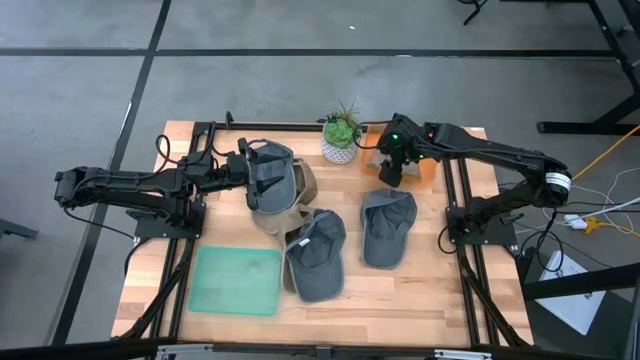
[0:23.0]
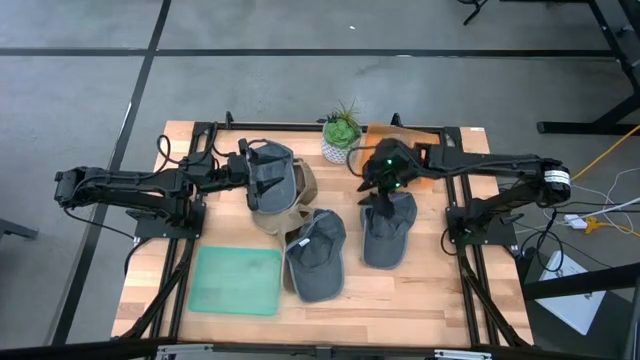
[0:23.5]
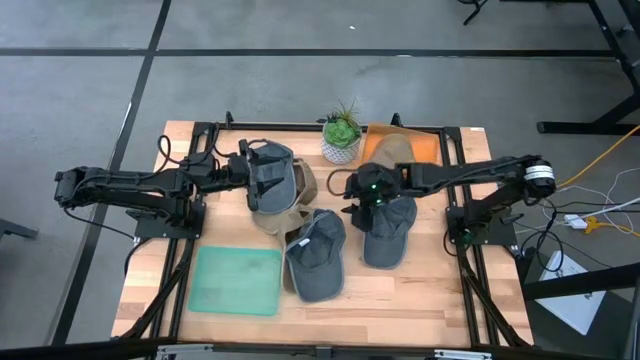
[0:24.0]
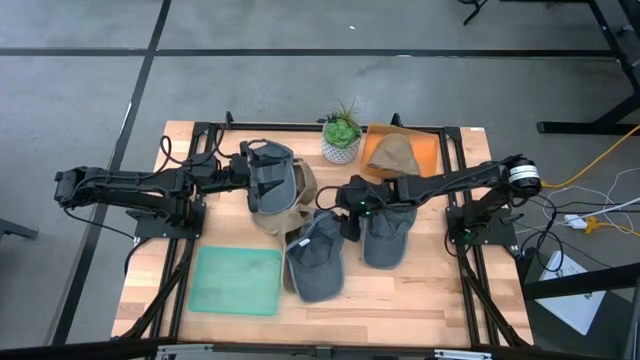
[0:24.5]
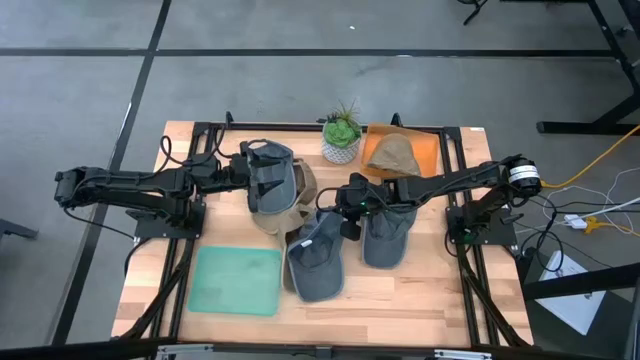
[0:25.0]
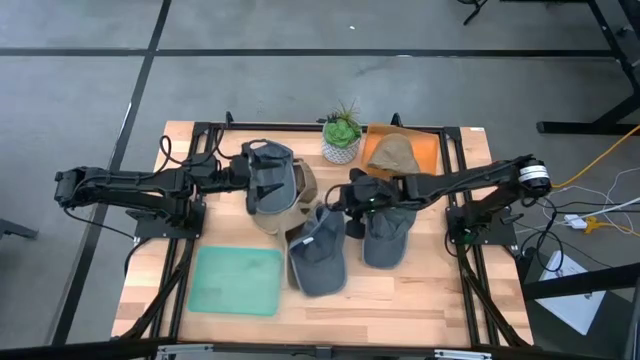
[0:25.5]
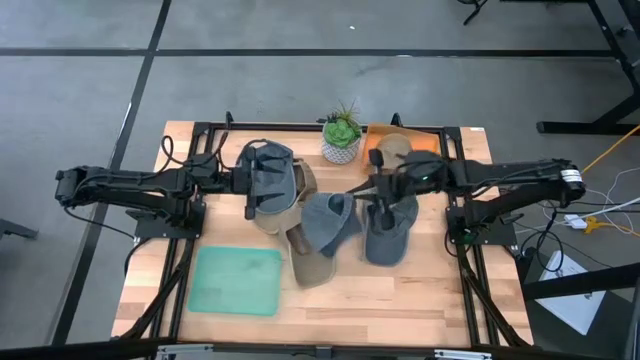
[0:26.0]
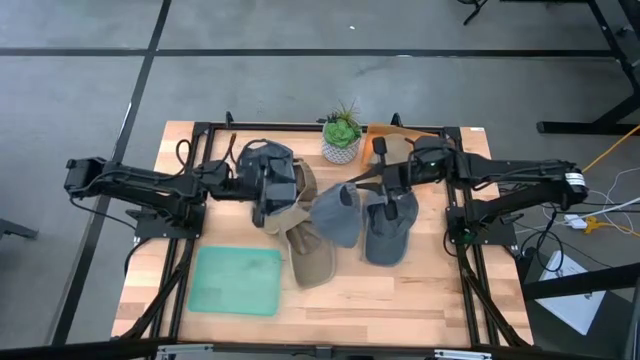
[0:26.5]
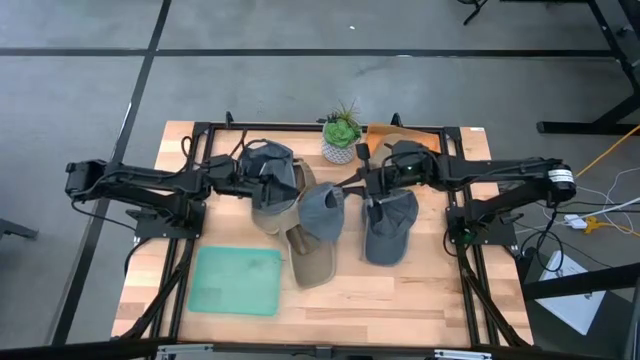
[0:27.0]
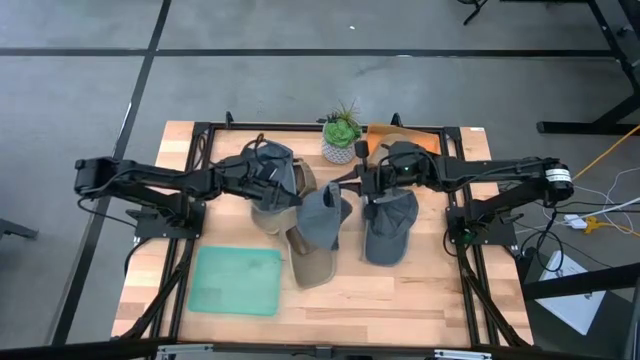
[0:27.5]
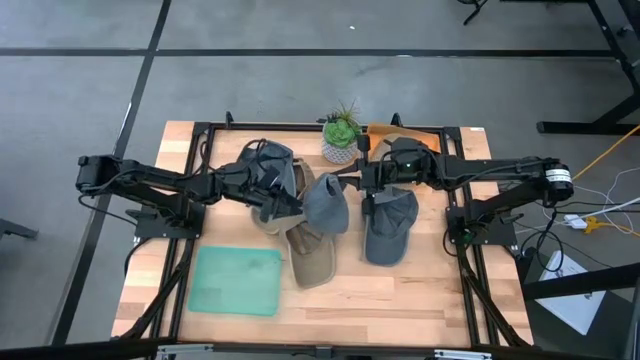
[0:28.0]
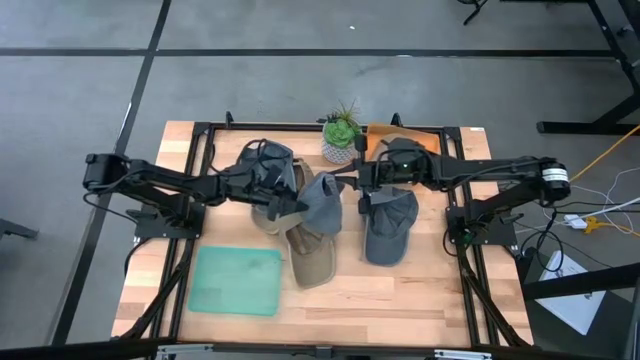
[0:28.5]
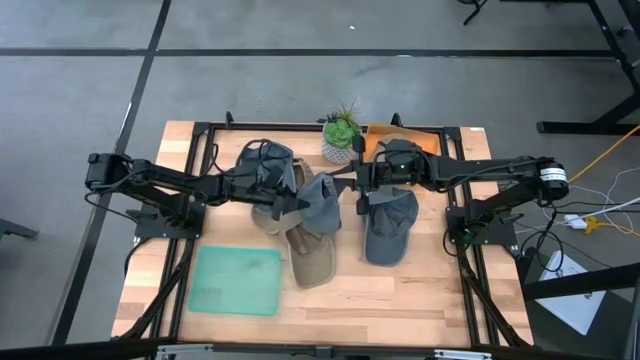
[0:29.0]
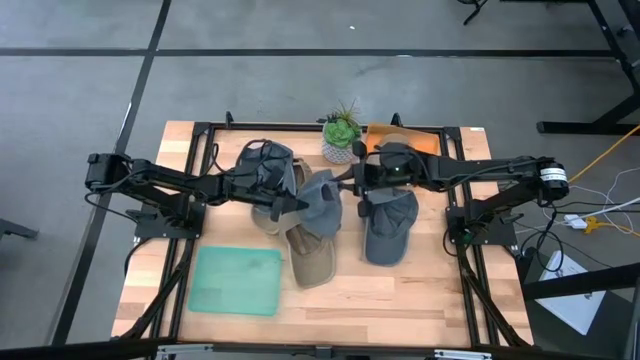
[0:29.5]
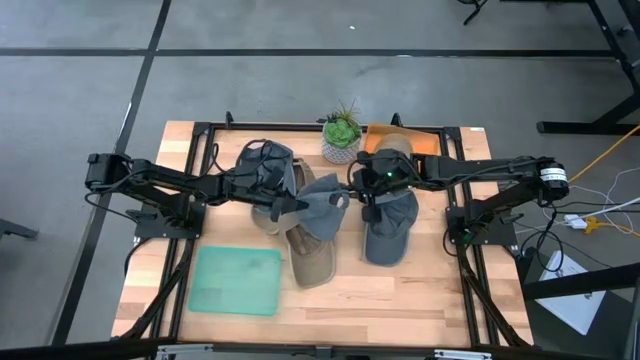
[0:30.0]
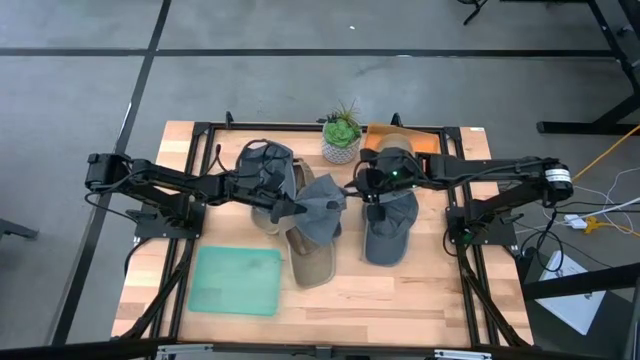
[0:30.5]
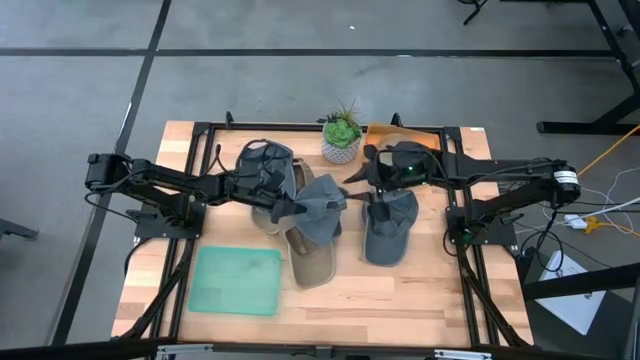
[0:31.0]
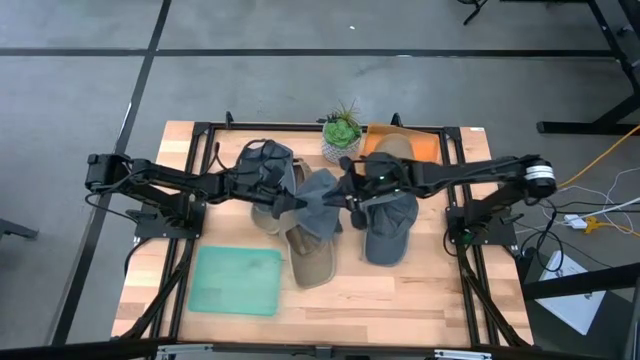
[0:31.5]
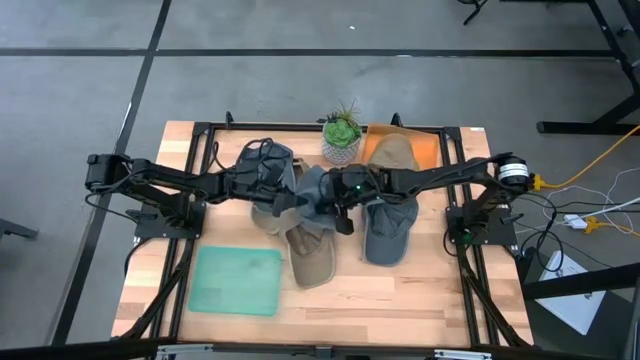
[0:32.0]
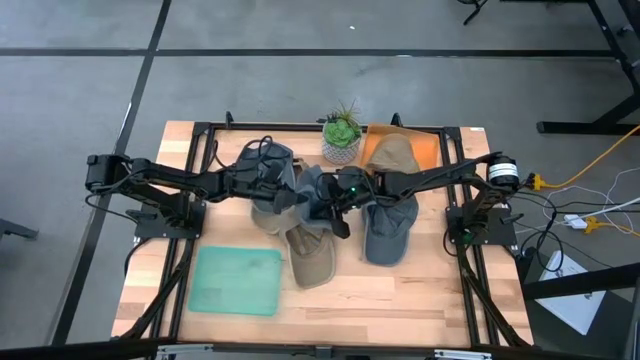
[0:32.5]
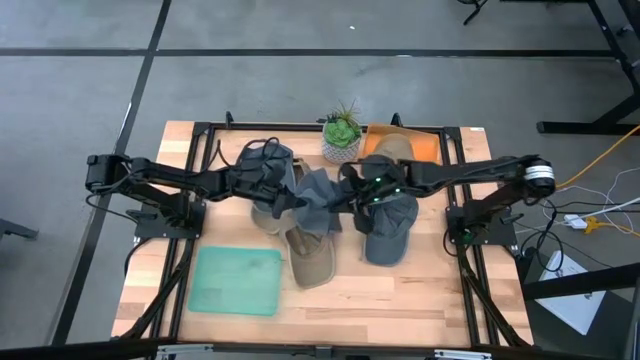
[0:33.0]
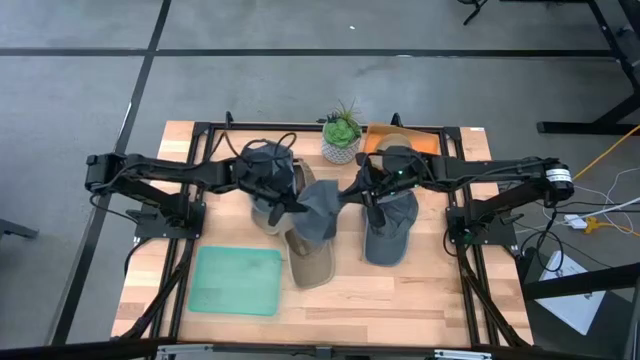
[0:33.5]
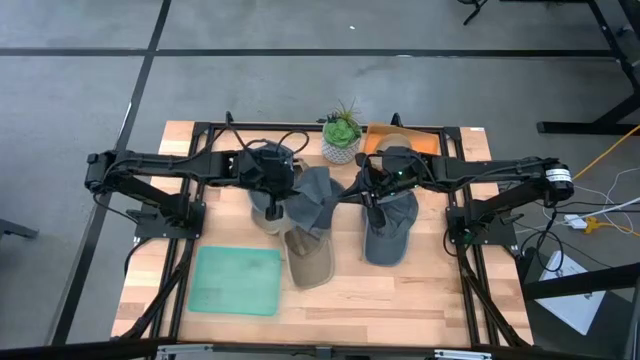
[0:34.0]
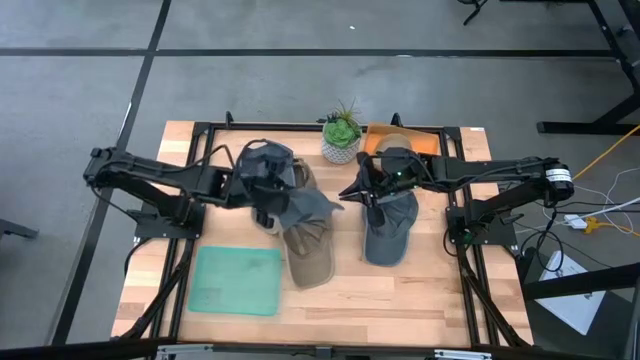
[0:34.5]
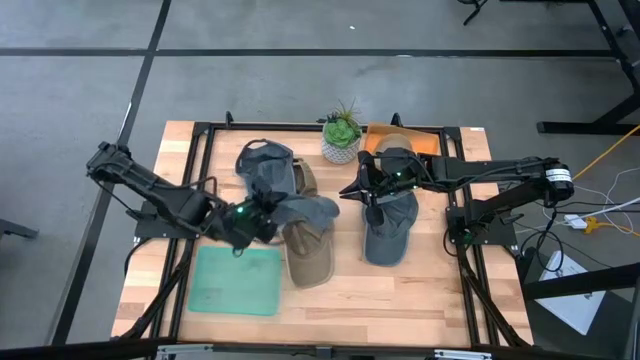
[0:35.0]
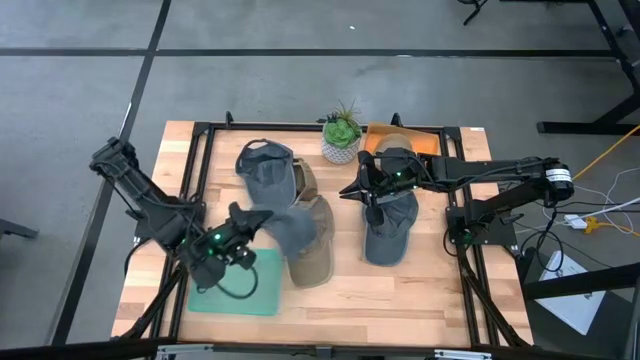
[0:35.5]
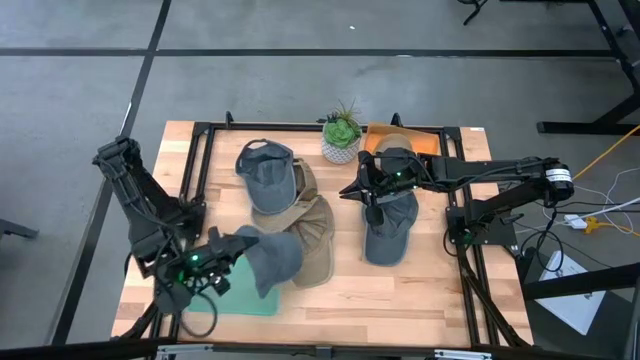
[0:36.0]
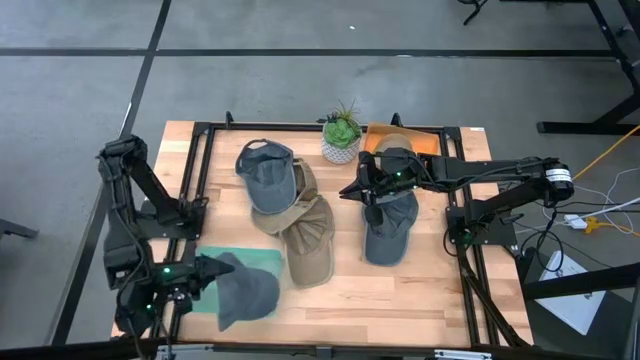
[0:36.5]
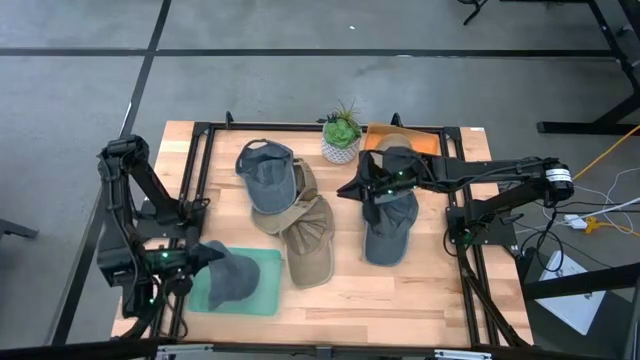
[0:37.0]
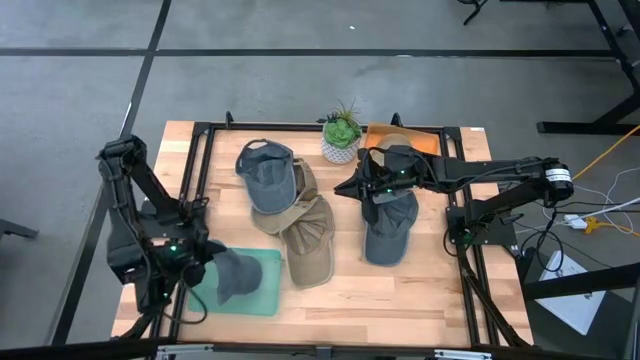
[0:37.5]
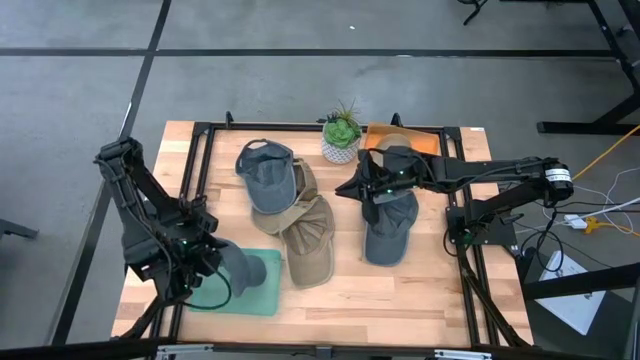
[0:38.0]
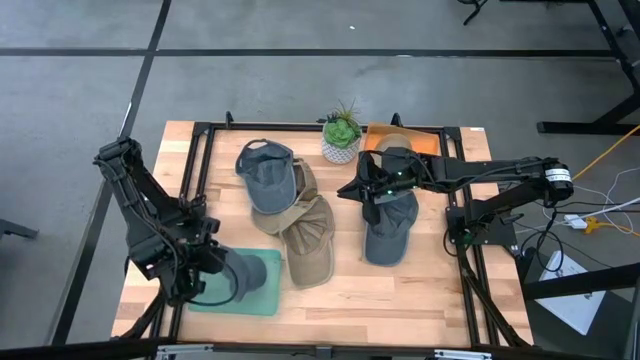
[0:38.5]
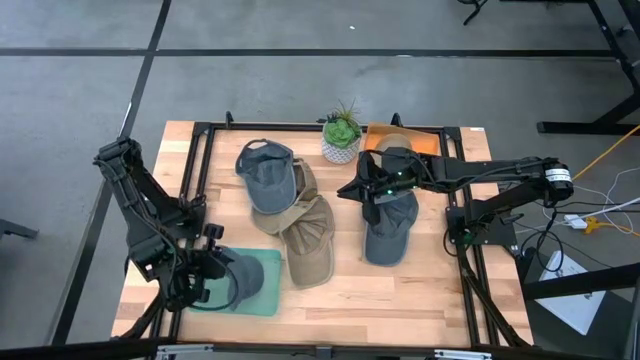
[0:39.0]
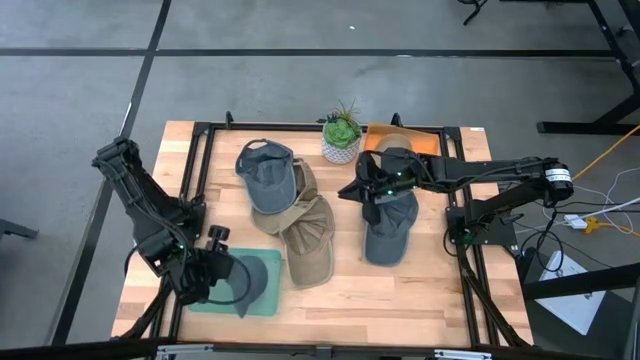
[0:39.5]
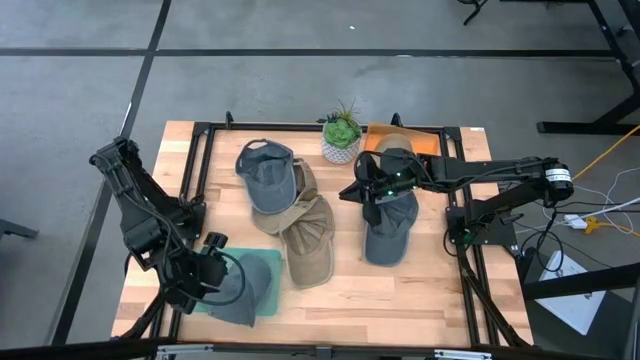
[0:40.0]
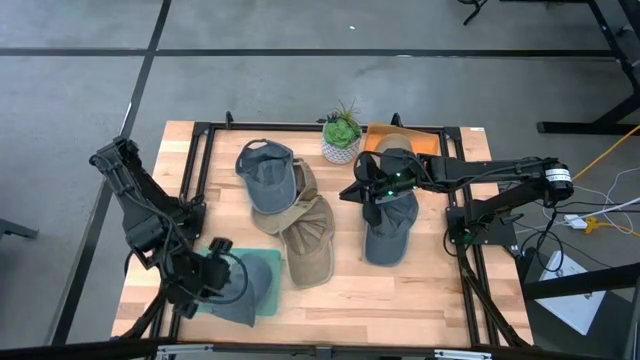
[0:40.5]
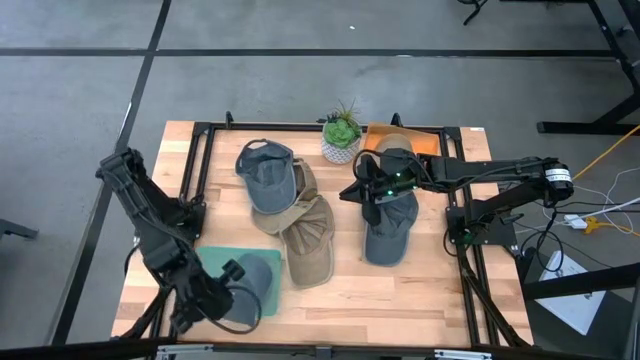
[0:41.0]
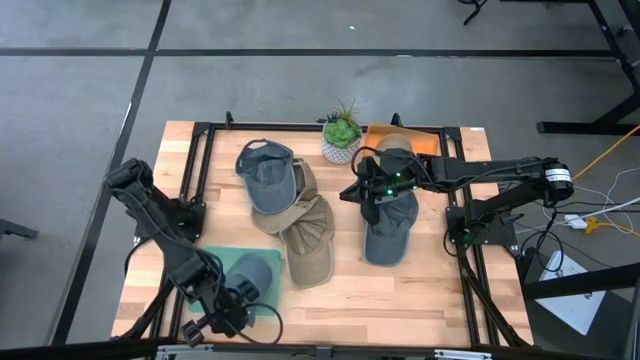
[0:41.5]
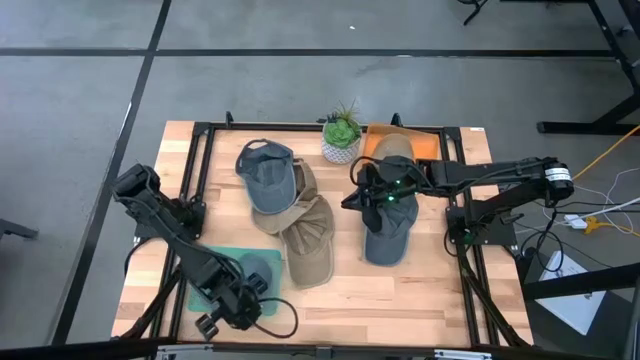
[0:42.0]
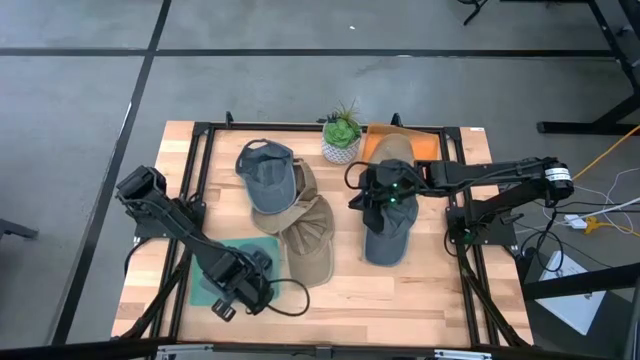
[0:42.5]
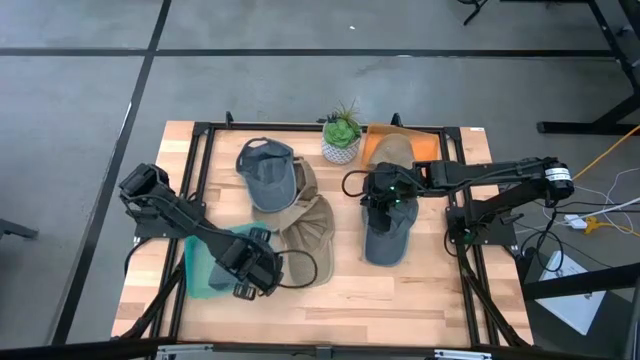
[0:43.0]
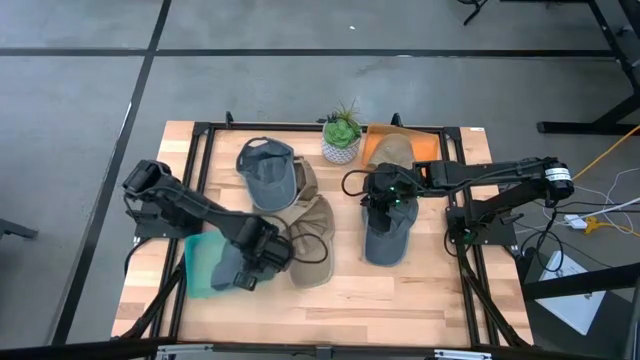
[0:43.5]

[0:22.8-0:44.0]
Task: Pick & Place hat
Put the bottom left blue cap into the green bin
